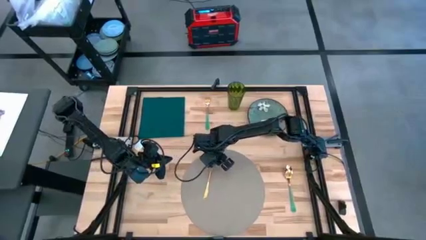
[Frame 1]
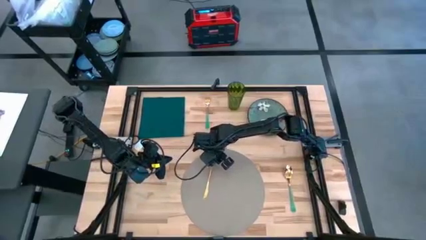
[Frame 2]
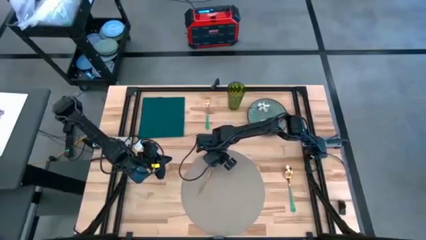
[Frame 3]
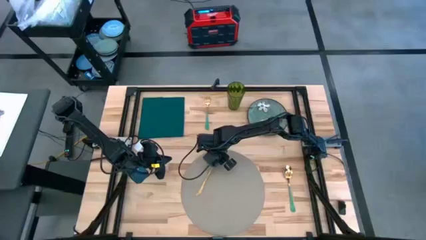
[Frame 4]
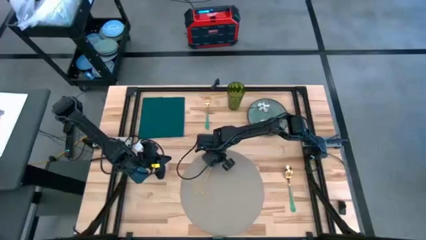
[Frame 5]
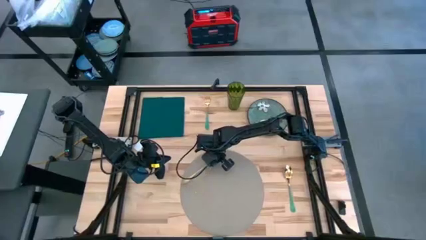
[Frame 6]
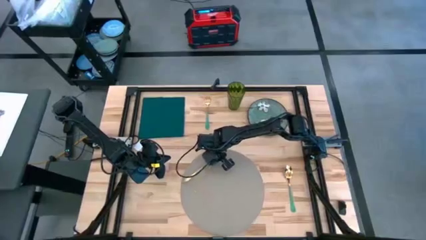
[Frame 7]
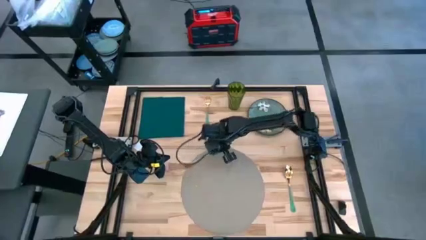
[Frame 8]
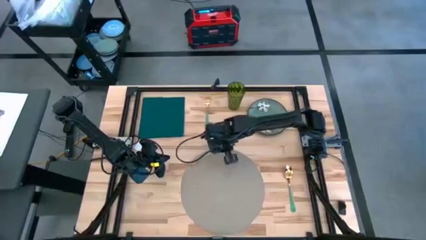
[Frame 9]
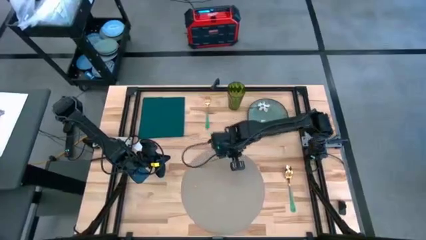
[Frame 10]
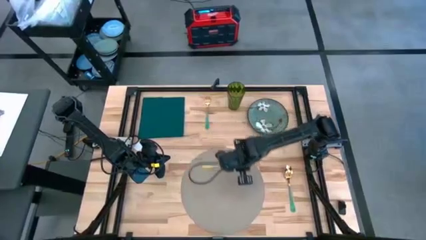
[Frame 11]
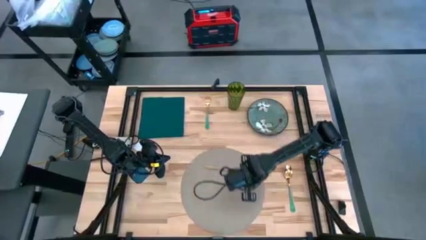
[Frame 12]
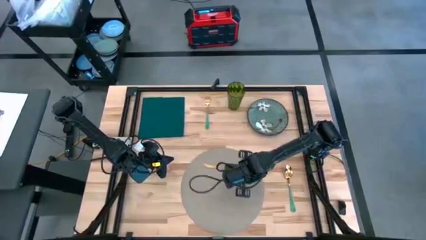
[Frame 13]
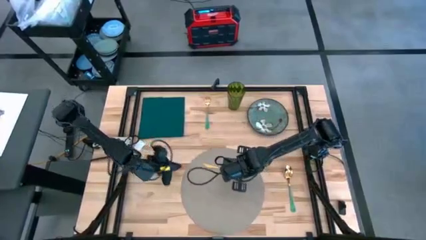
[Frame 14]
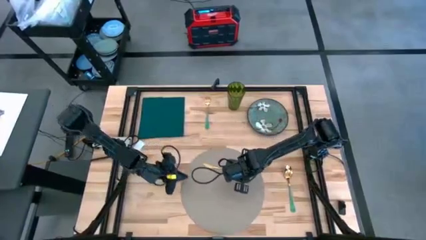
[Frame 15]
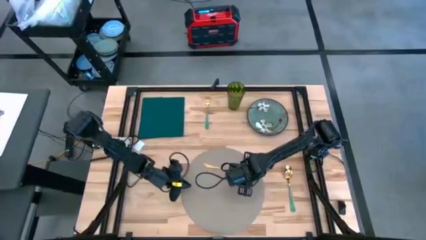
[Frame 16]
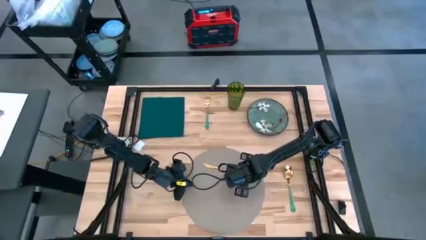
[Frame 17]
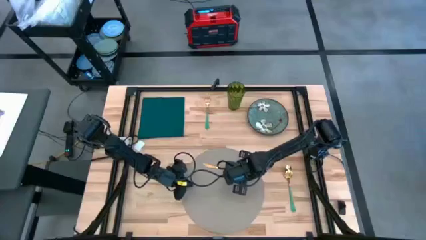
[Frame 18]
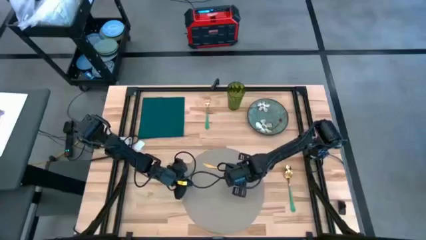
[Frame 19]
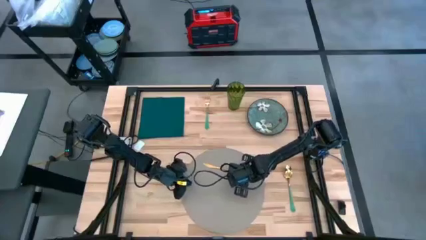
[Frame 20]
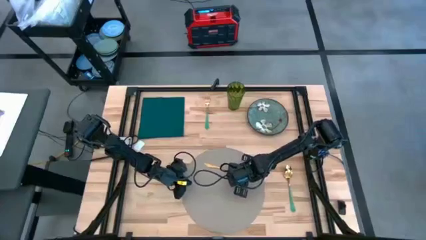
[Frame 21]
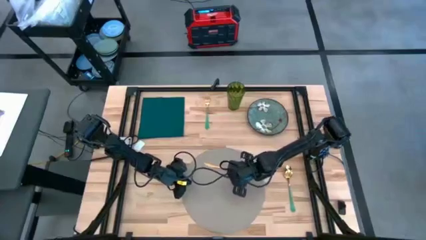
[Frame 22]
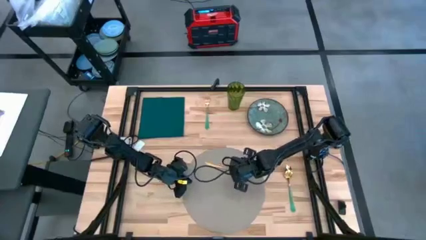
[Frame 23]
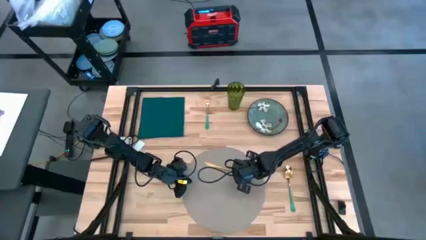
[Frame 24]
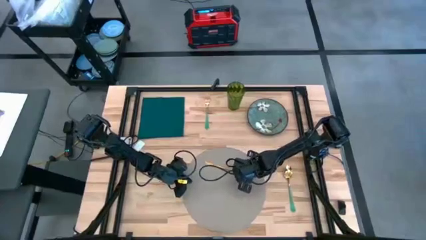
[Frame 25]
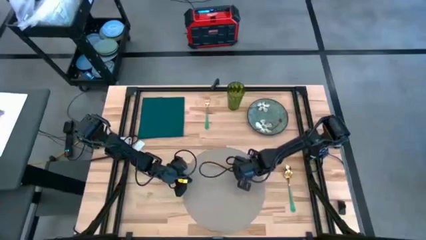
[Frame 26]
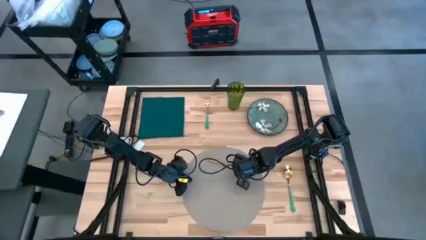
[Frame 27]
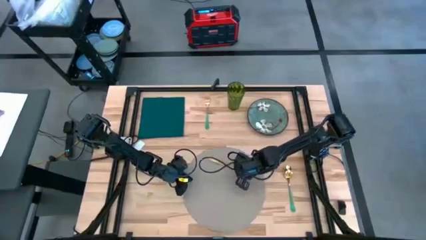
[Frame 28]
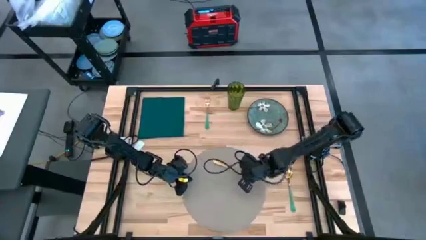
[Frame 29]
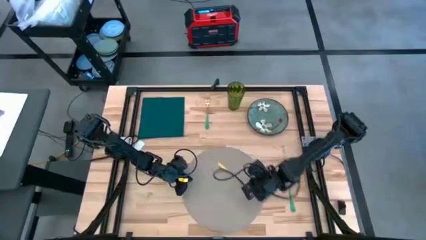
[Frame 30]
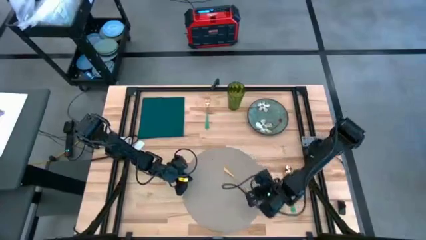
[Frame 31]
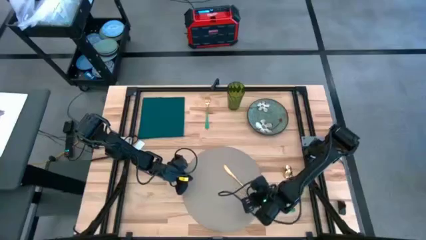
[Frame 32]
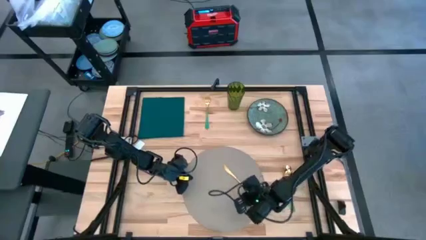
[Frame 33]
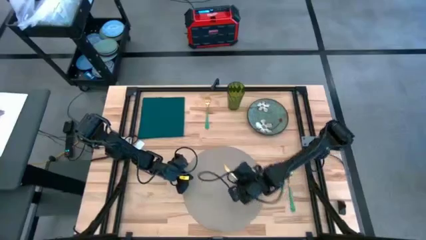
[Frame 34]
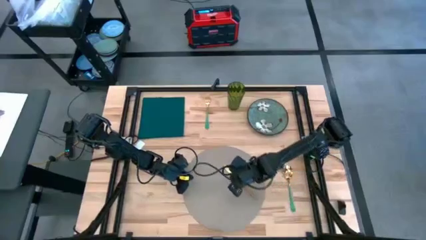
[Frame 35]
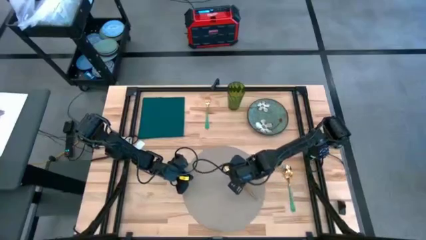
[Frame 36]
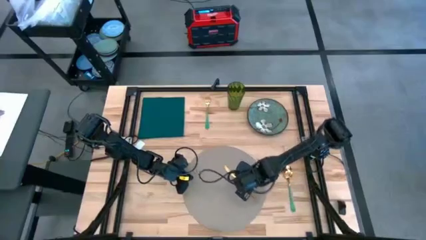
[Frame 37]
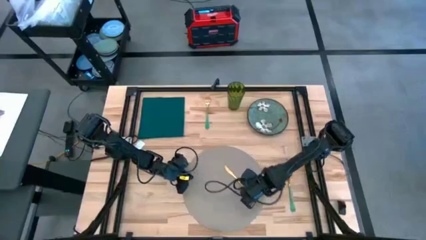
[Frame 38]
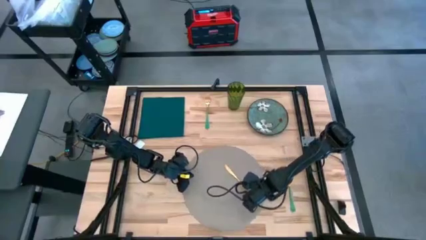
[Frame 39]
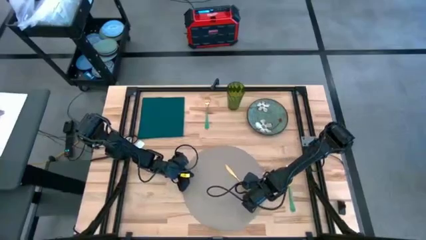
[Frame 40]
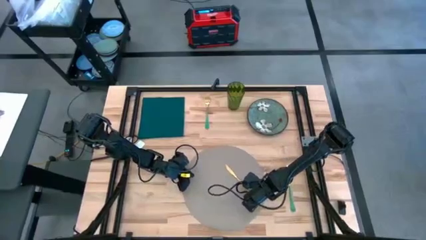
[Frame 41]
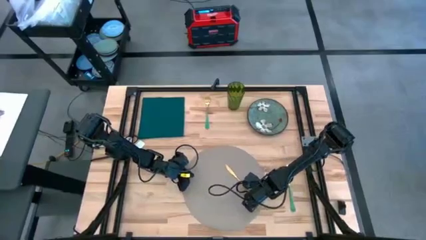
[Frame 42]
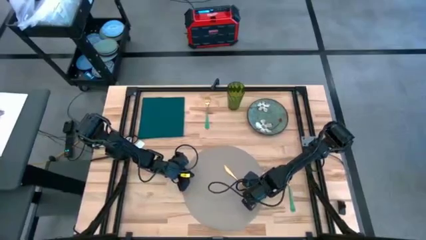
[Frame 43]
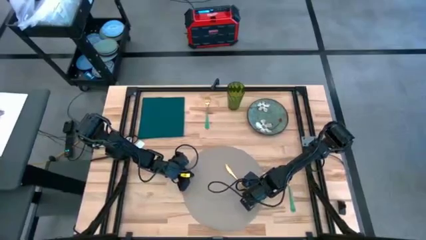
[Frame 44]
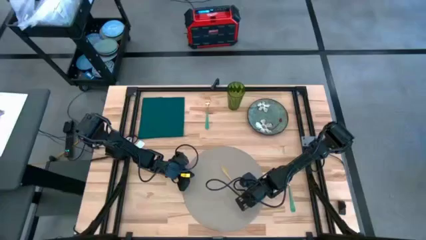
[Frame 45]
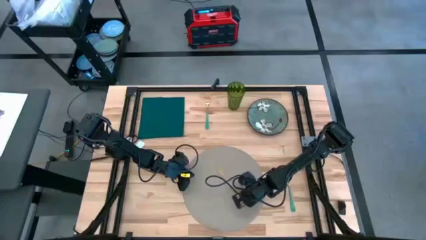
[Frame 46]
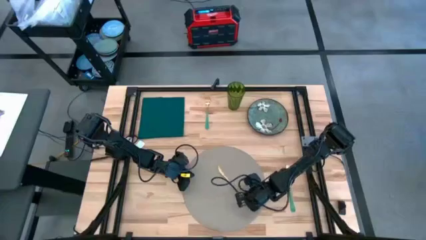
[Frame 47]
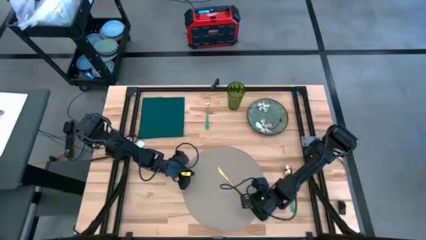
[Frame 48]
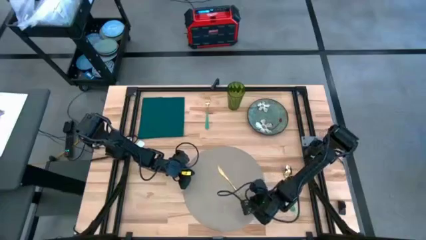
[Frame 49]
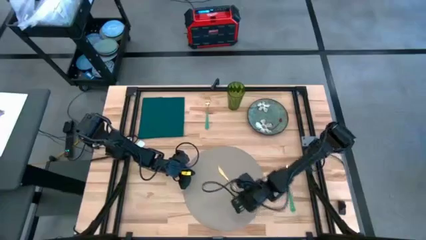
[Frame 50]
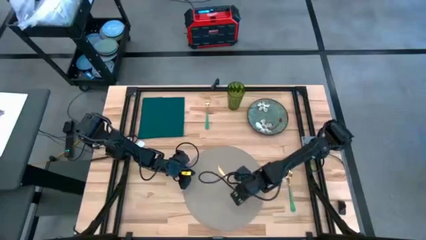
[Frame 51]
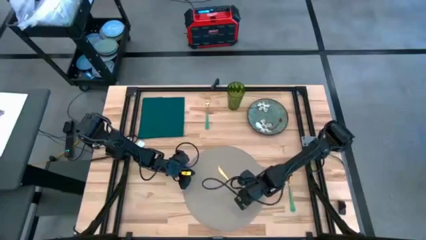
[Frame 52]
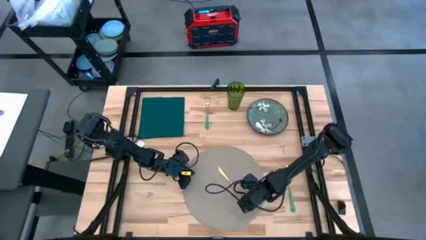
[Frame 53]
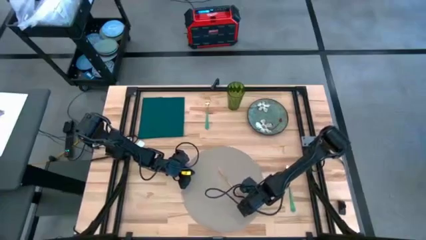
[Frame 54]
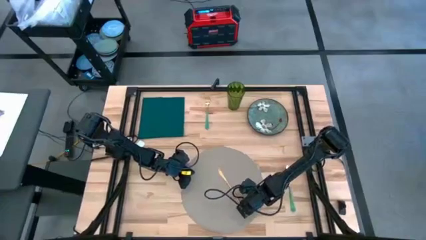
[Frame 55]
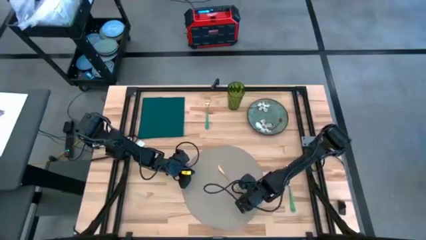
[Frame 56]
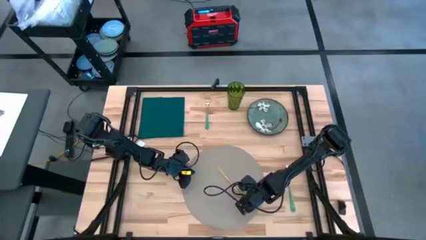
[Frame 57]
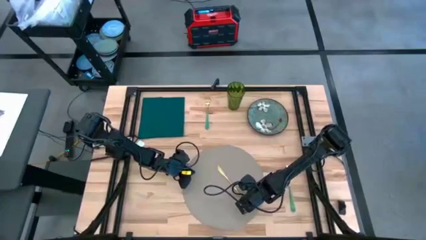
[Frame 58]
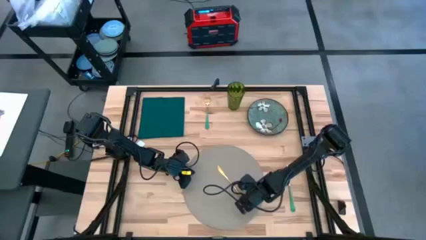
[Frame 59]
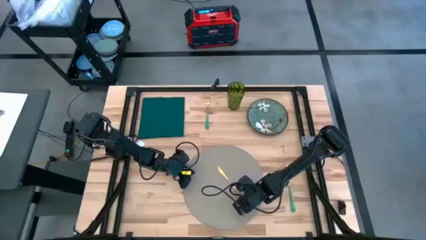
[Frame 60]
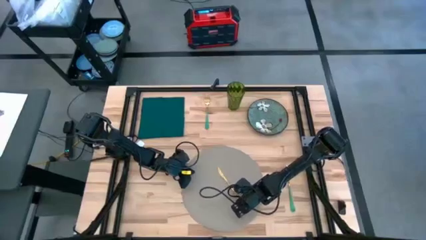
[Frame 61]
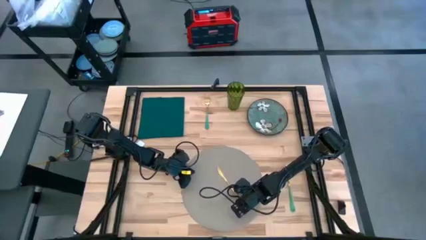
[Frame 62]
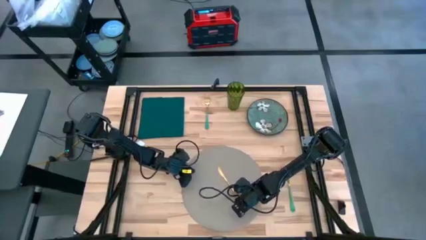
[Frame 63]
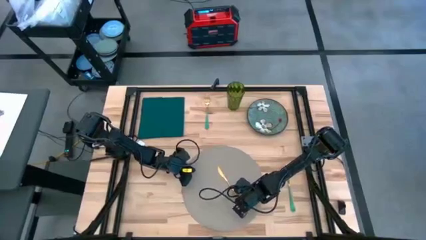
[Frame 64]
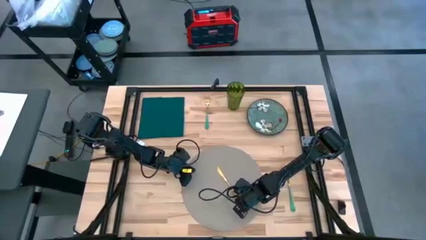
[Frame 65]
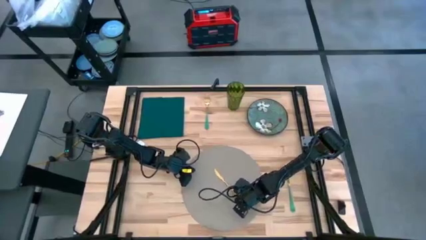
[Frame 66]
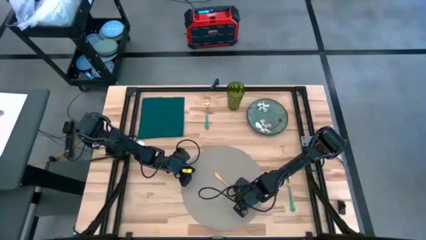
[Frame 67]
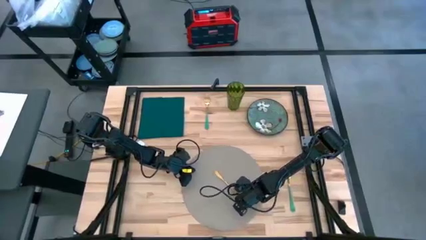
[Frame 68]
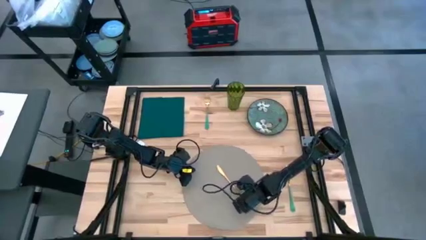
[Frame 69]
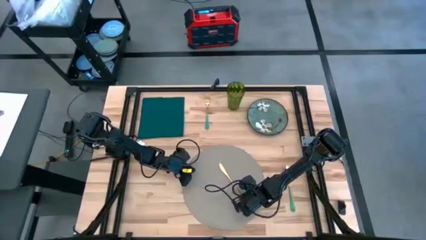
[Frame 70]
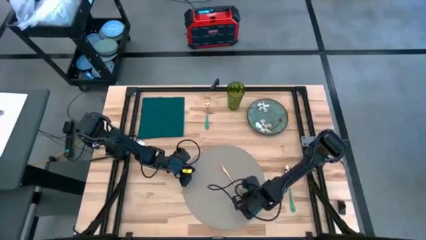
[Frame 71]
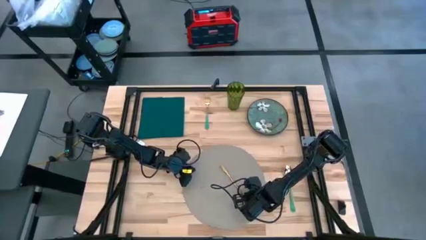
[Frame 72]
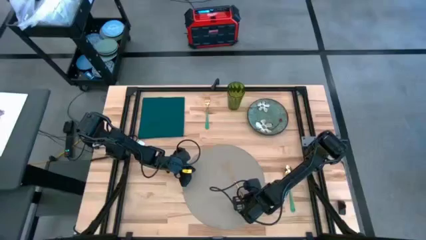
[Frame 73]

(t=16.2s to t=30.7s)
Task: Set table place
Move the knife on the gray placemat
